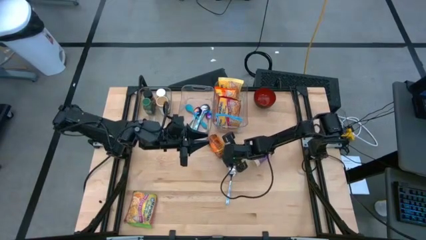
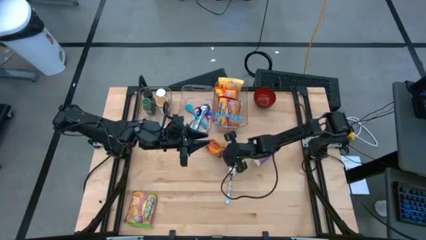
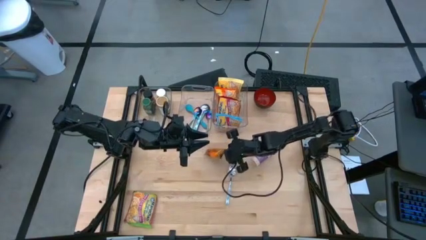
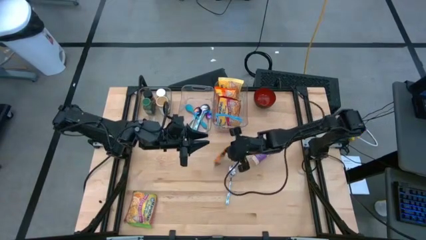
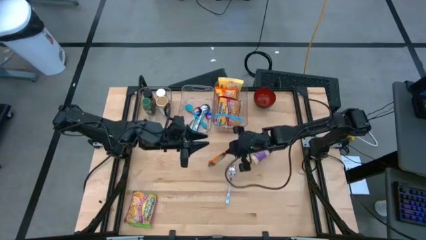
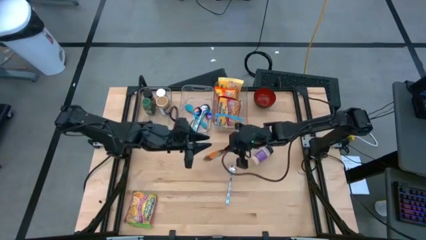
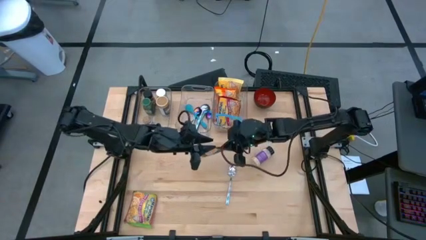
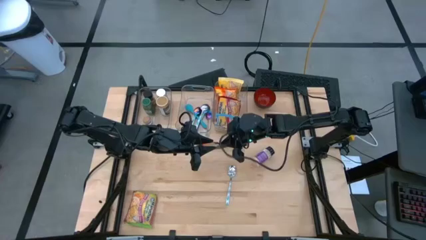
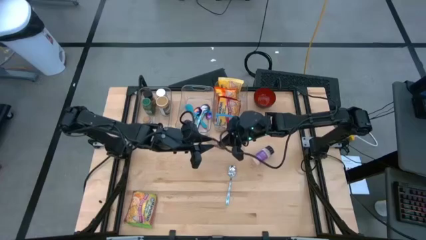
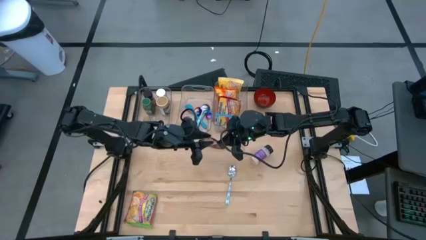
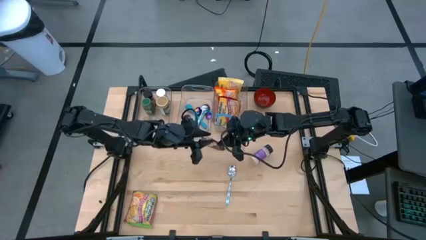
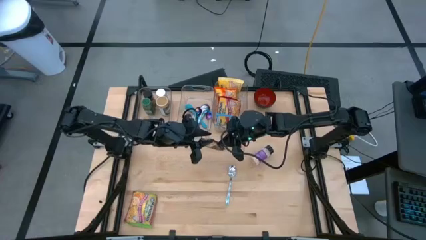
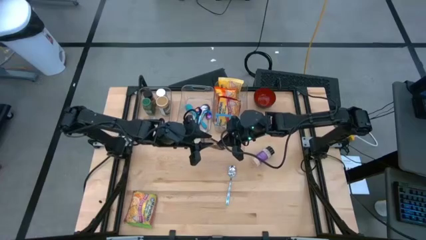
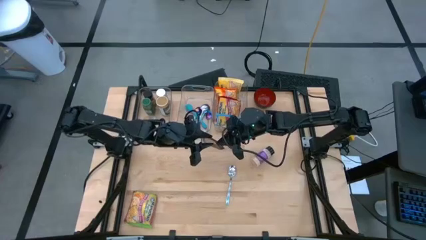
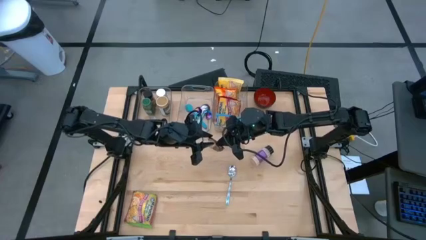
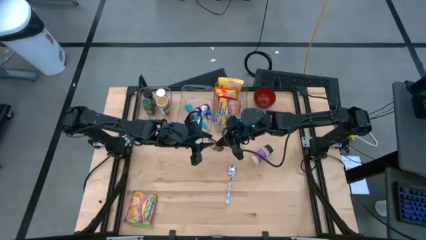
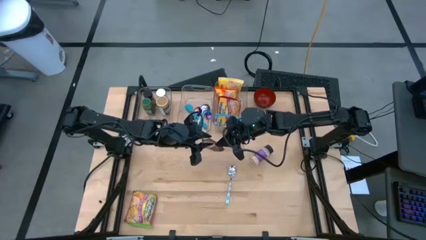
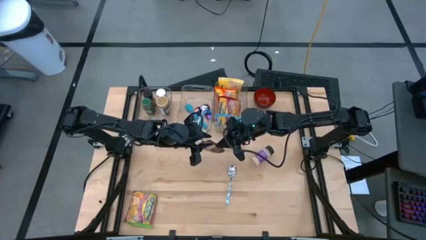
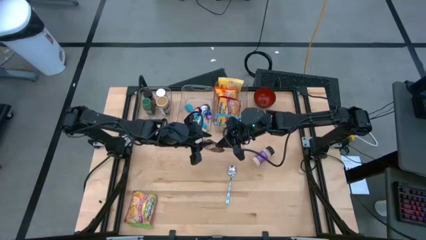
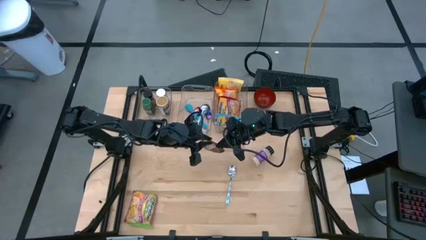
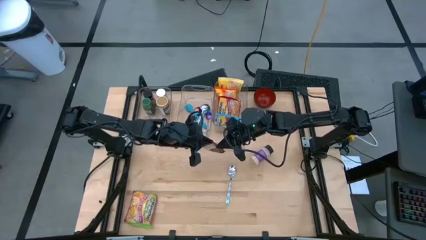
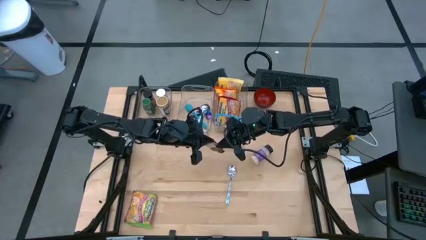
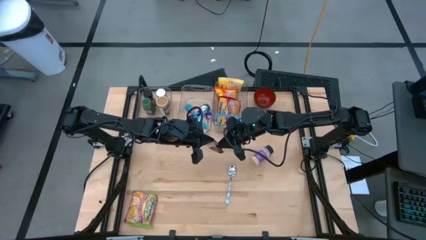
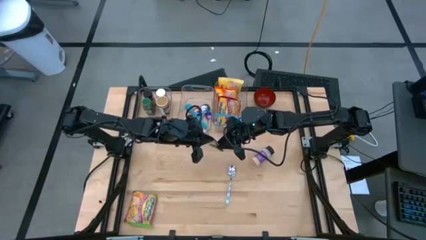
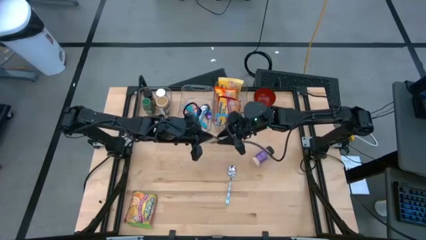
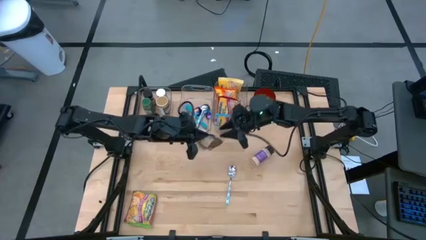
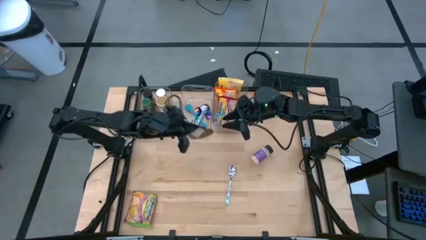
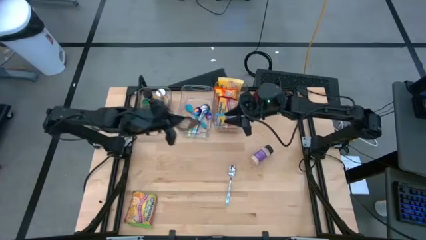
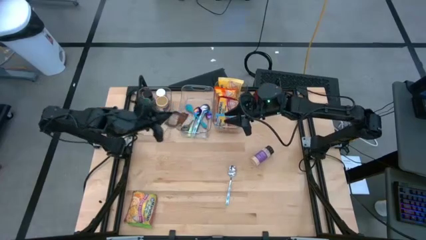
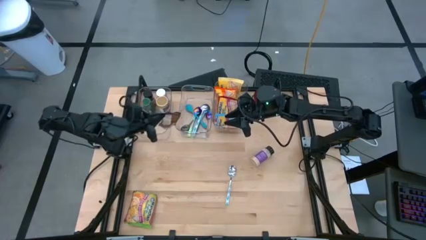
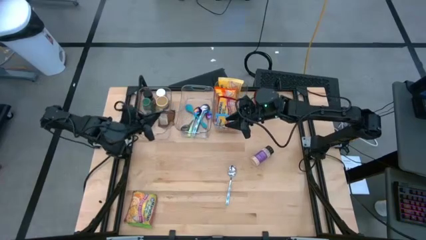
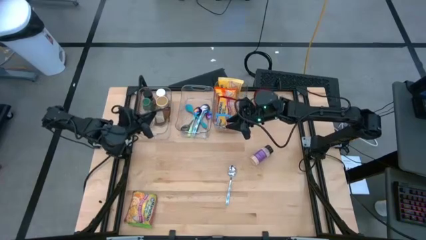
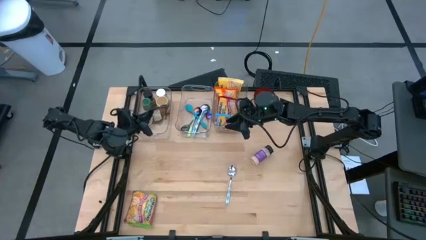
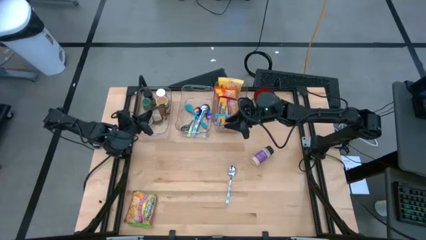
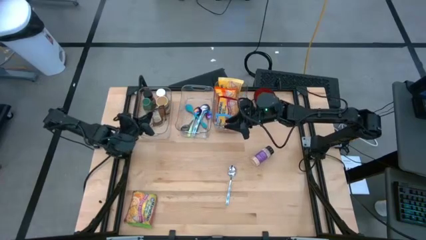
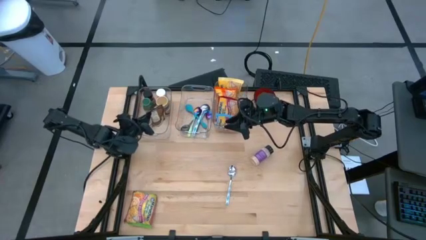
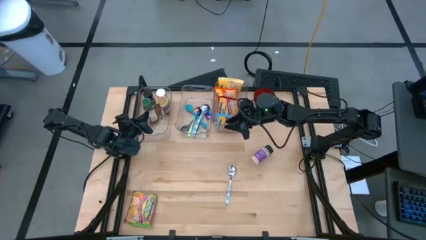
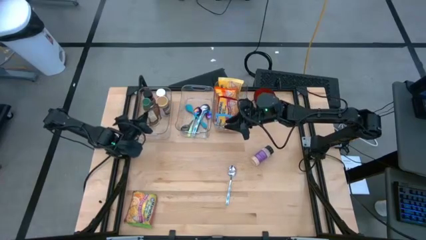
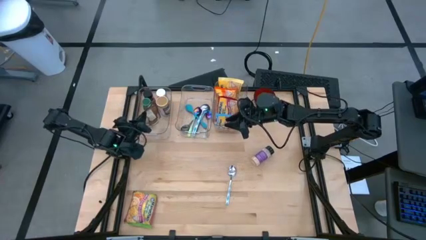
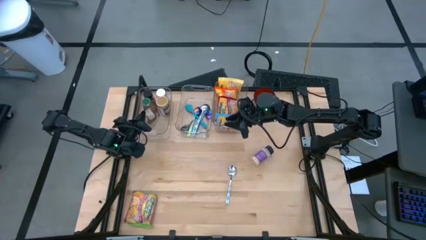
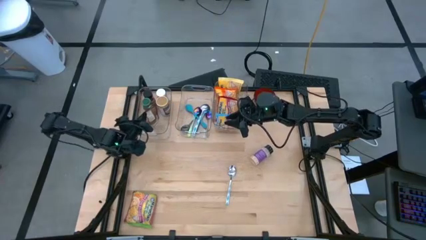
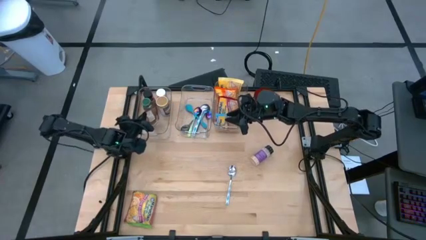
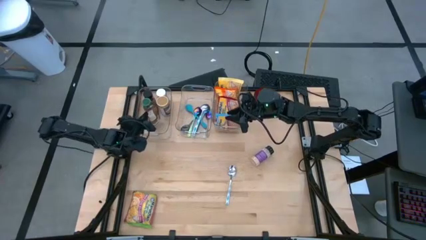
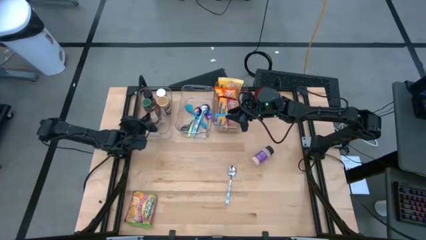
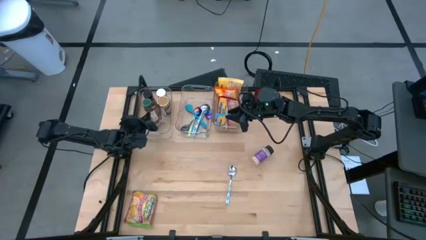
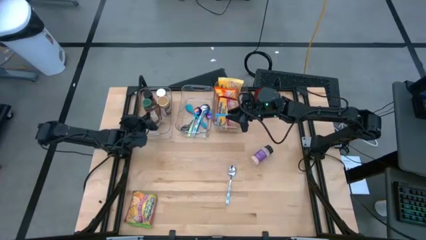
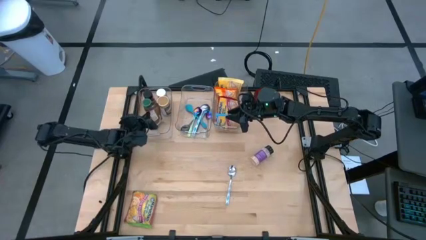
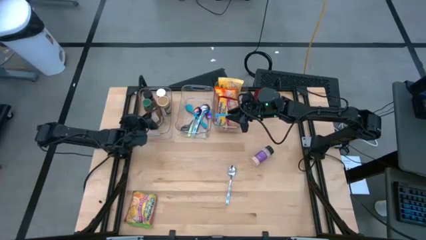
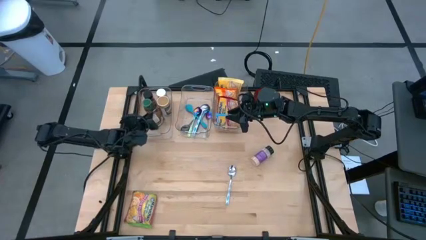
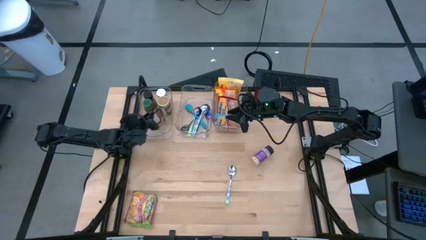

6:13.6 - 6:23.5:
Task: Pick & Place Food Item
Put the orange spice pack into the left transparent bin
